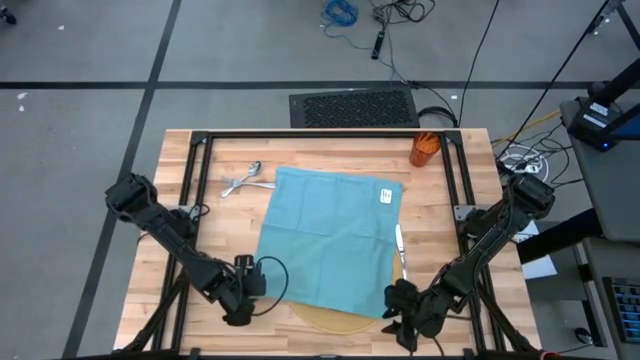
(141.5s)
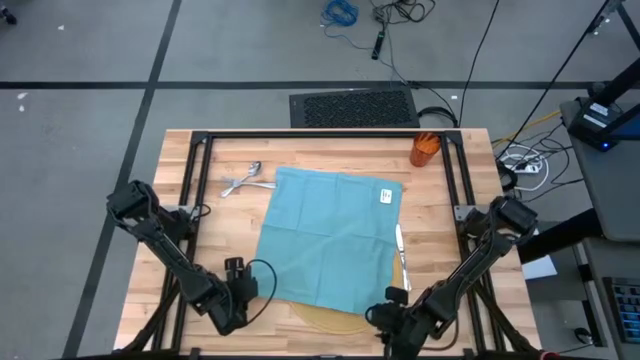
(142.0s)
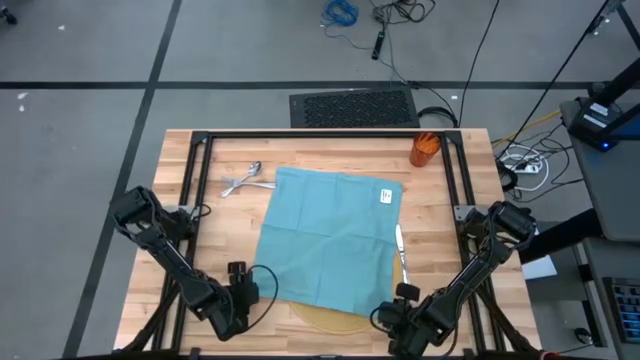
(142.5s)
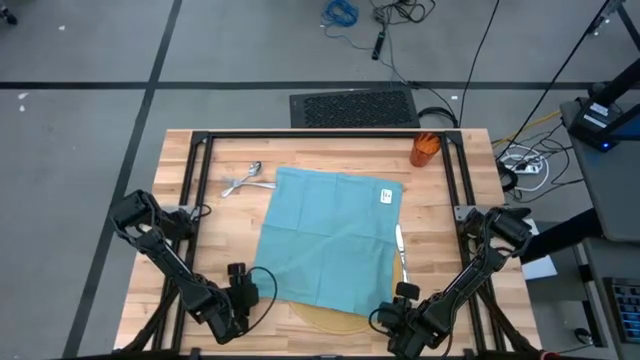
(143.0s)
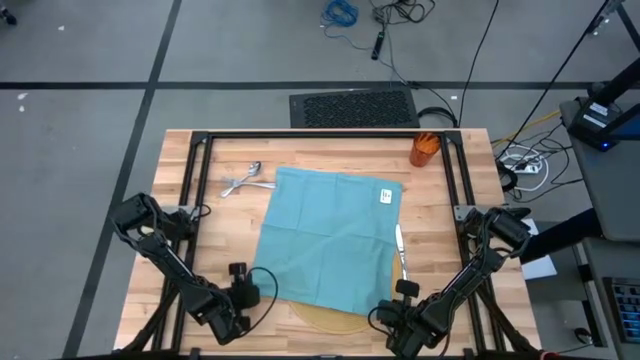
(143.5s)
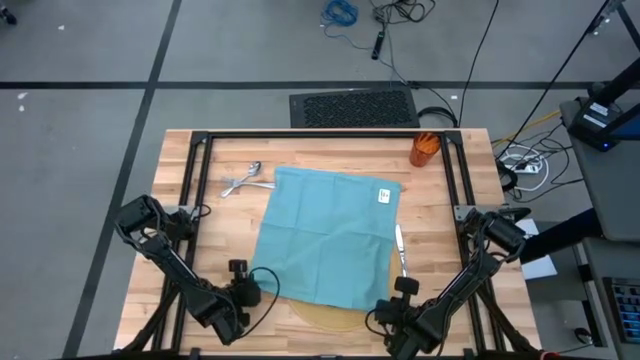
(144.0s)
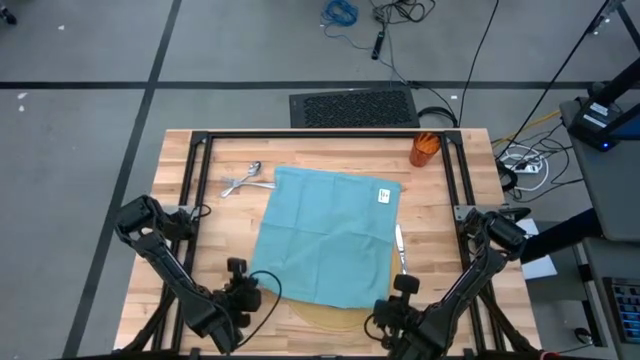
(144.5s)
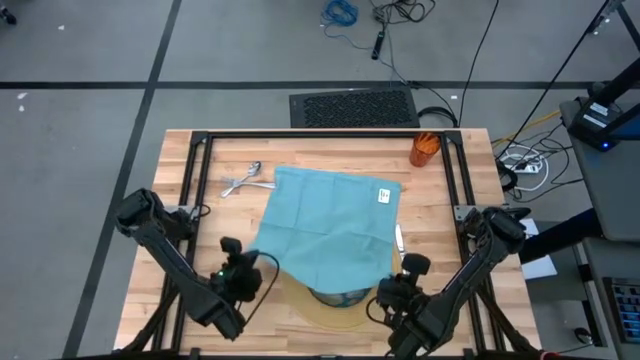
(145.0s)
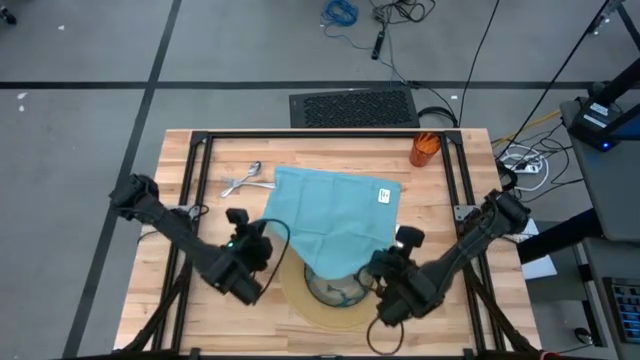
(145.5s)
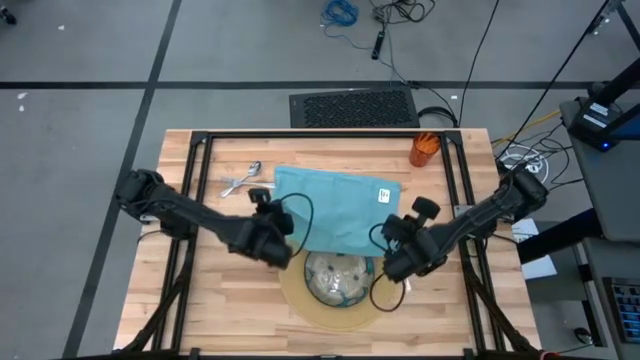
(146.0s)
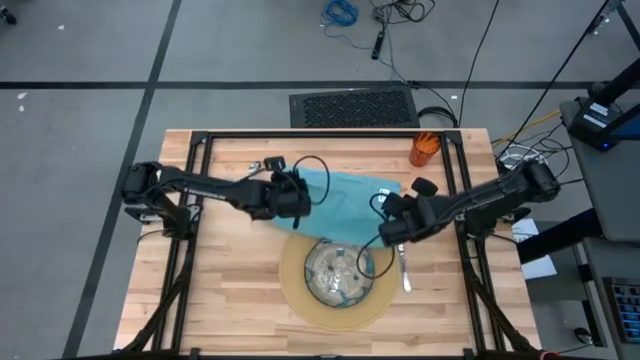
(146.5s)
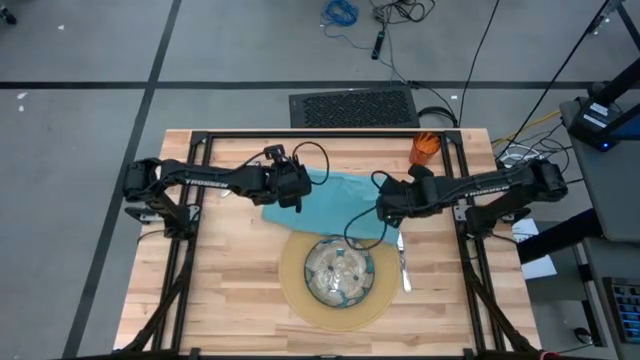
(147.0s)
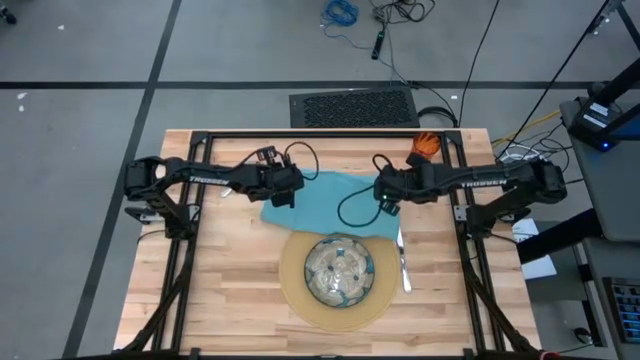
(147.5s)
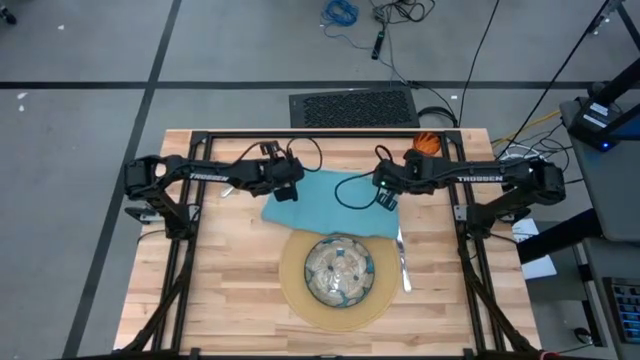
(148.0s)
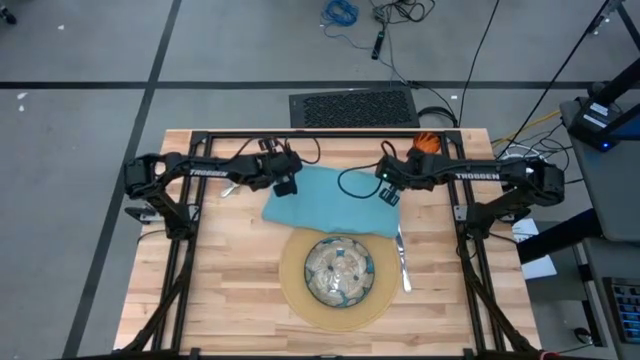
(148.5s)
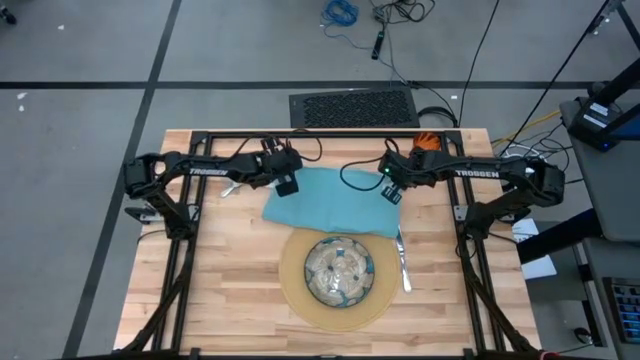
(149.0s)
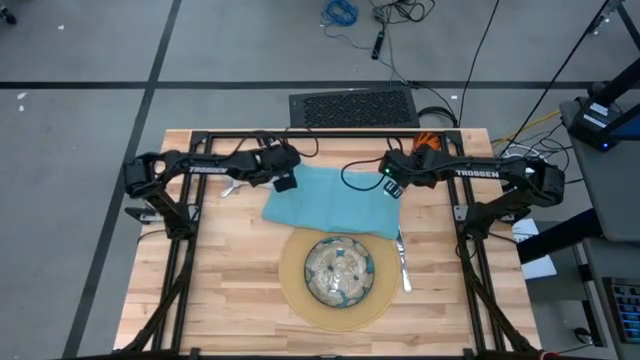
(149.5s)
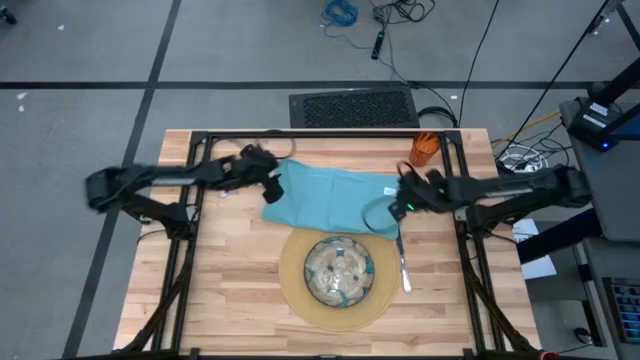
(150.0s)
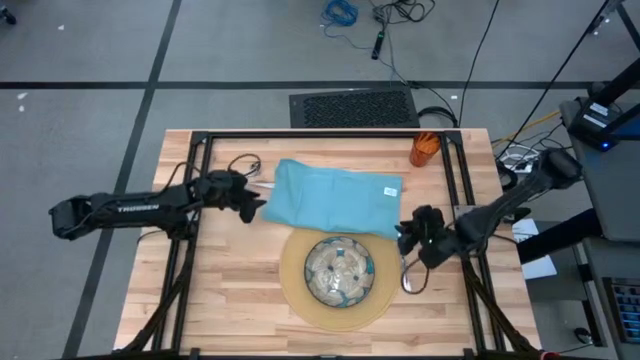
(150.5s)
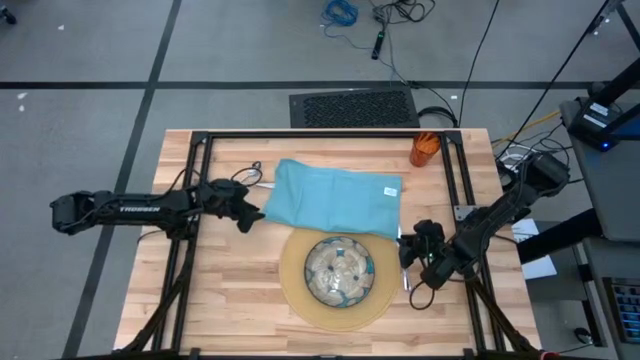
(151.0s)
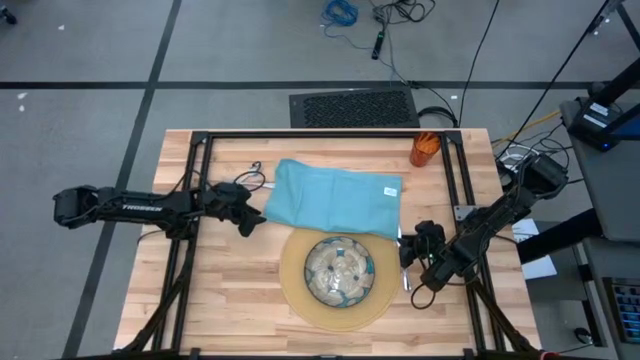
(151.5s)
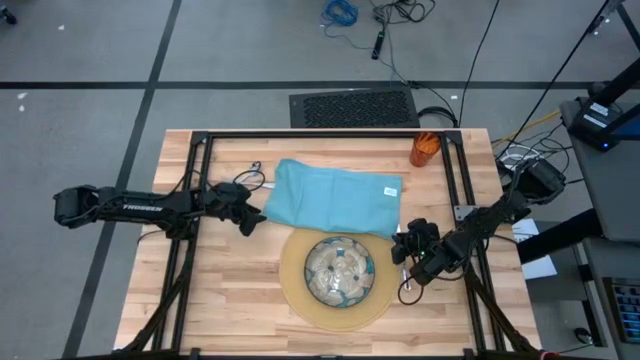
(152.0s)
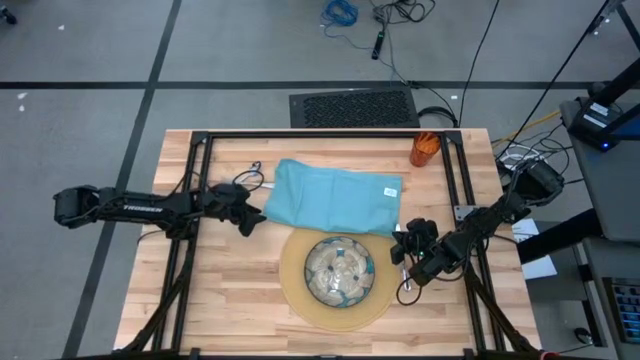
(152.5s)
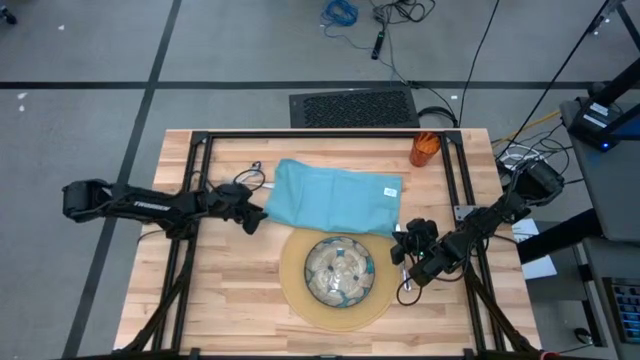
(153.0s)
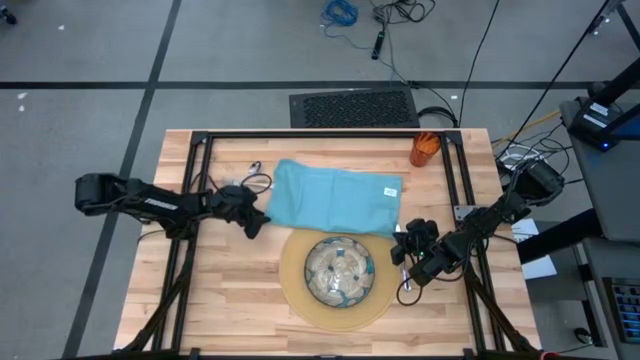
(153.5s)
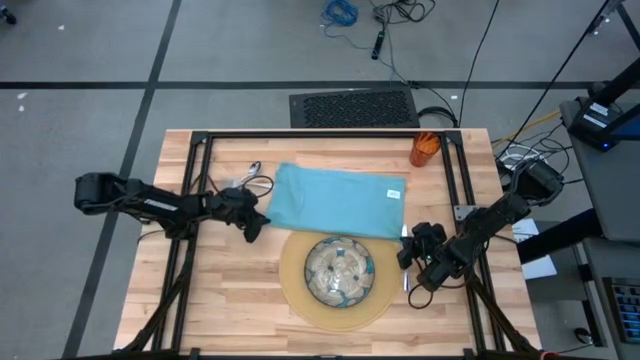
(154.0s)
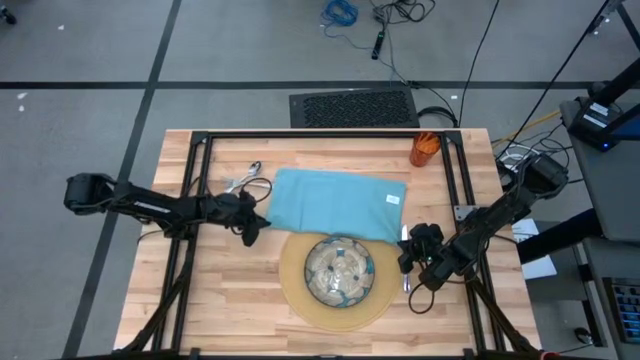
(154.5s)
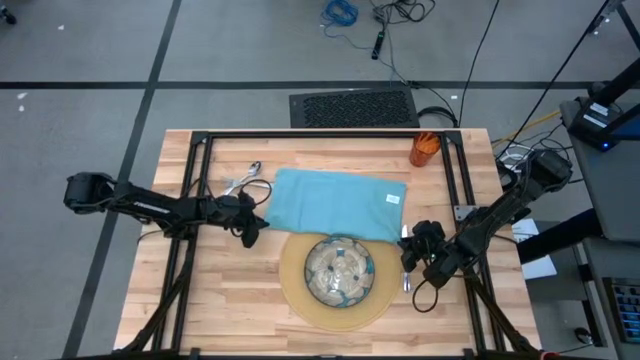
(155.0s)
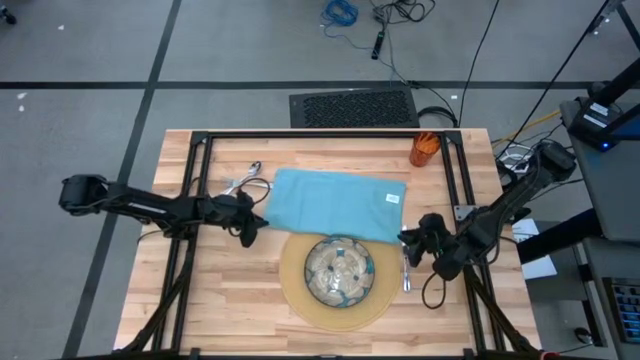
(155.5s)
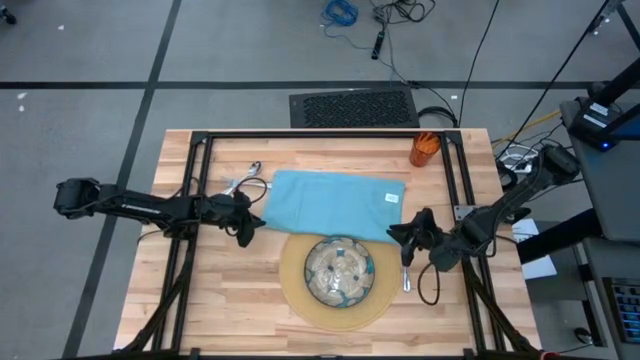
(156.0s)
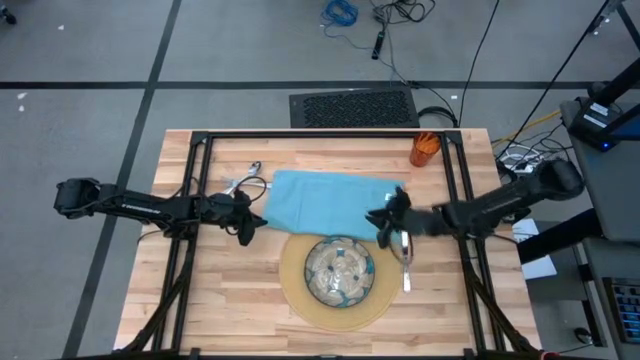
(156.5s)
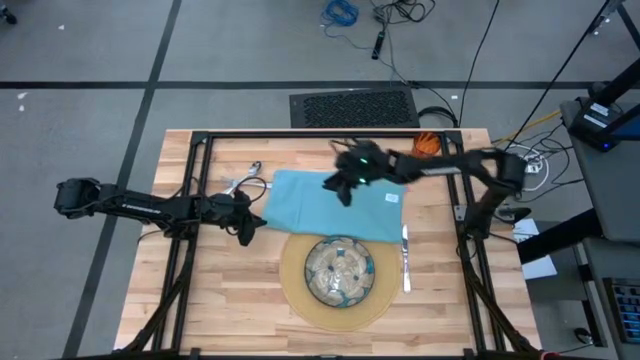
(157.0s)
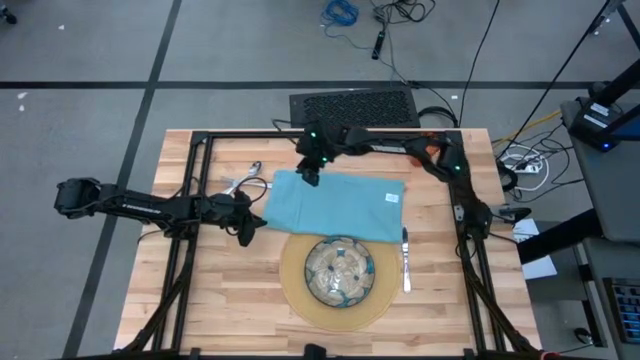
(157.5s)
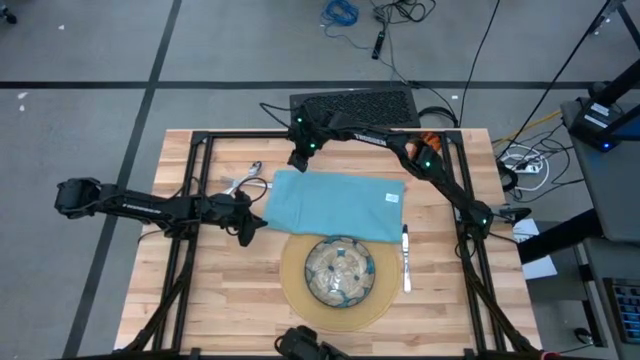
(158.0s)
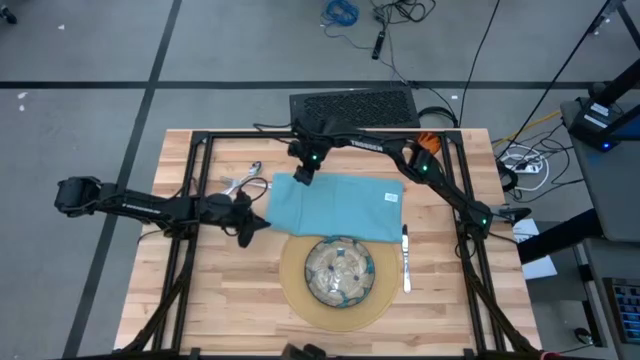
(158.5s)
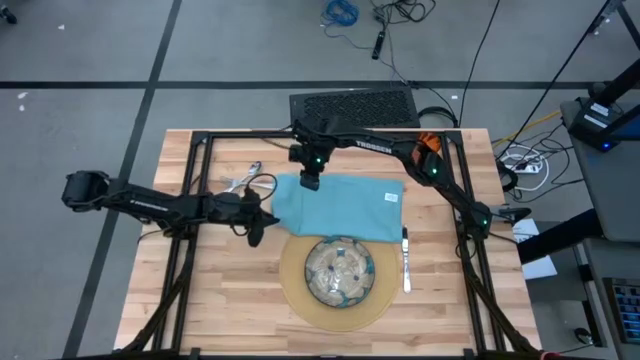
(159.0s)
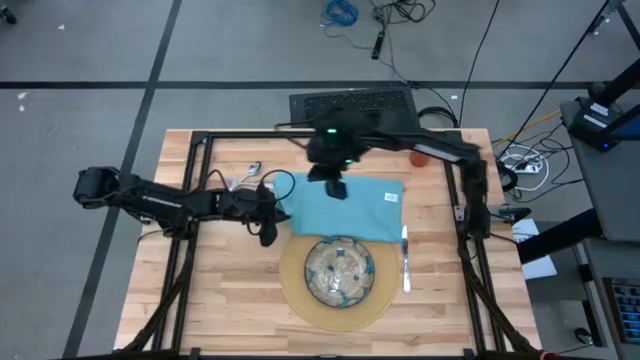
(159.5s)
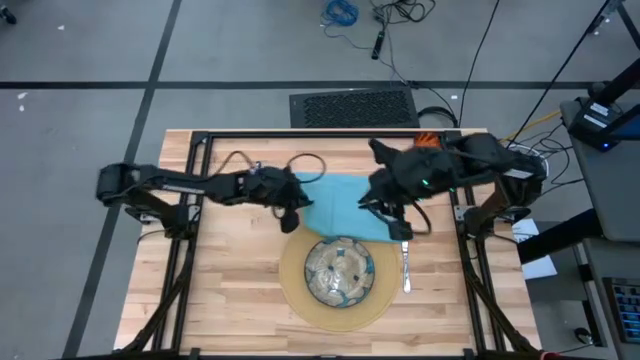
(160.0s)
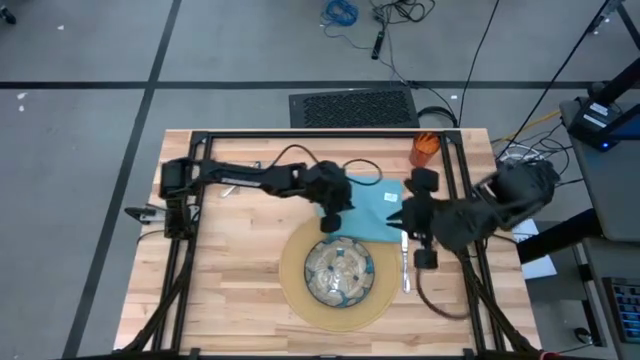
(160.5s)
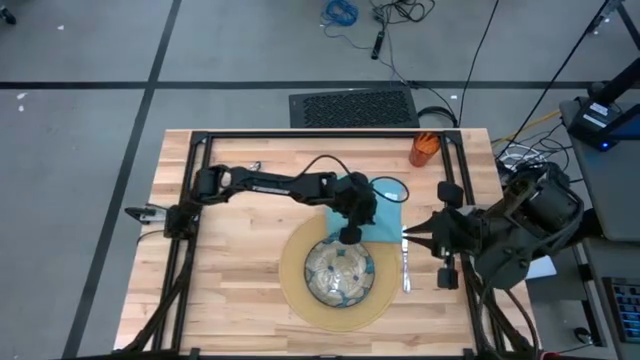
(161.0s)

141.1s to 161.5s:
Task: Set table place
Fold the blue napkin

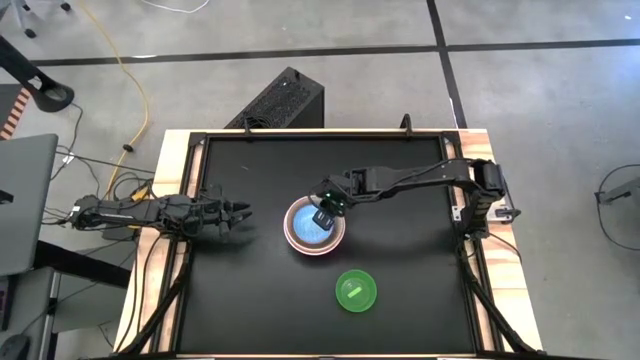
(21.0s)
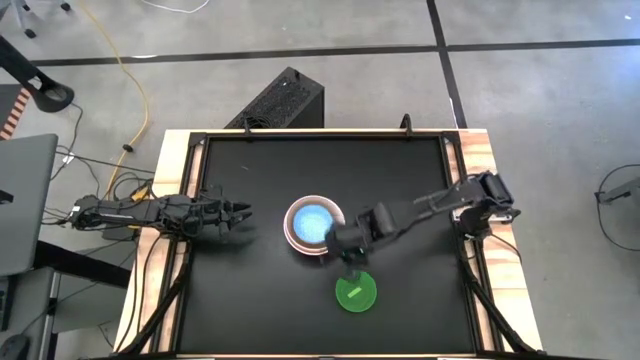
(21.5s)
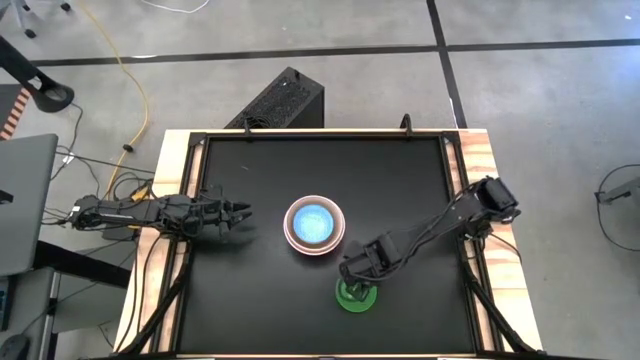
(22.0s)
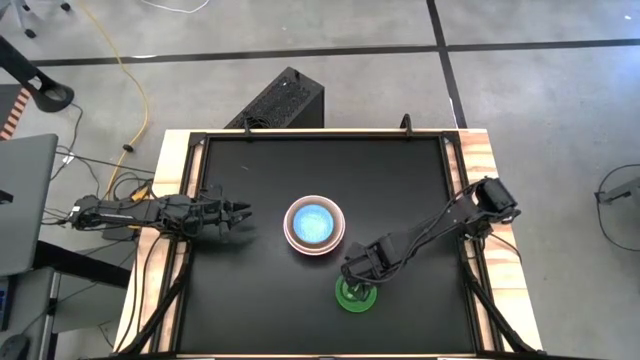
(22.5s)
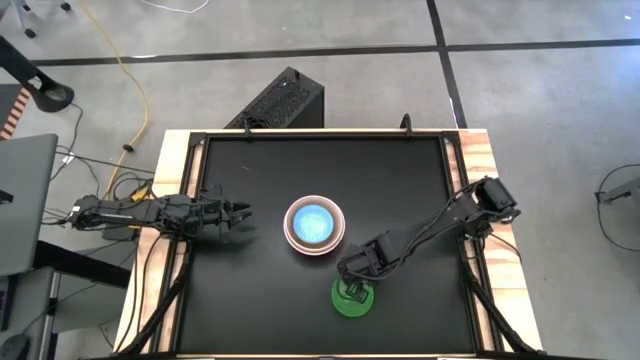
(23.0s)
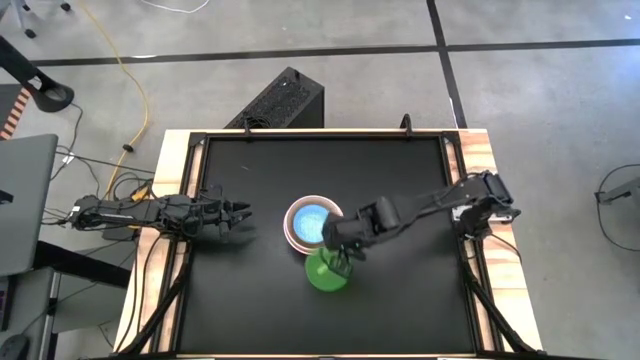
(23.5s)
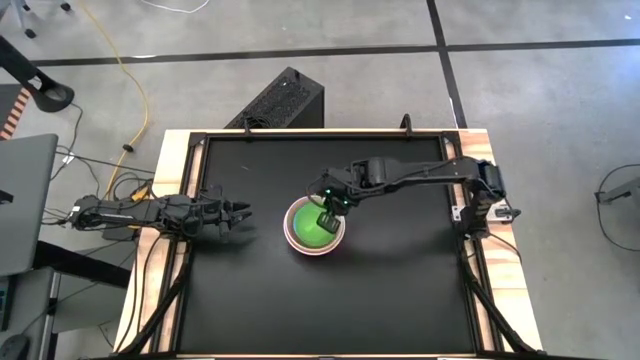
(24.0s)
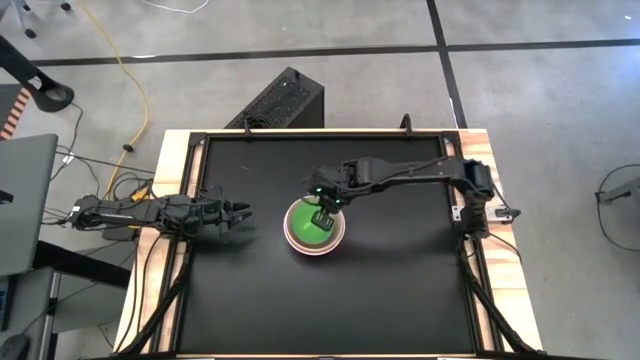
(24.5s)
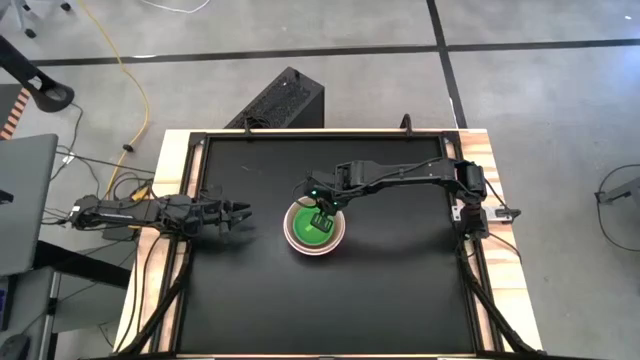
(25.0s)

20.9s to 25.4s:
Task: Nest bowls inside each other by size order
Stack the green bowl on top of the blue pattern bowl
